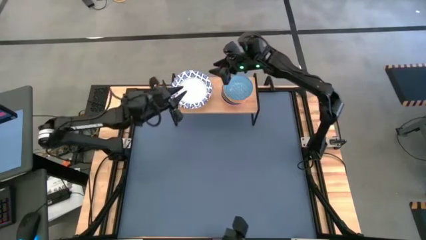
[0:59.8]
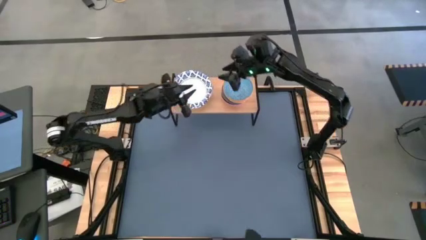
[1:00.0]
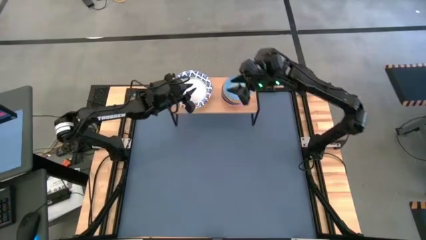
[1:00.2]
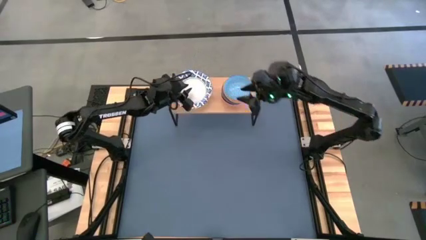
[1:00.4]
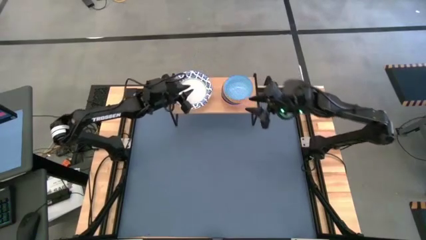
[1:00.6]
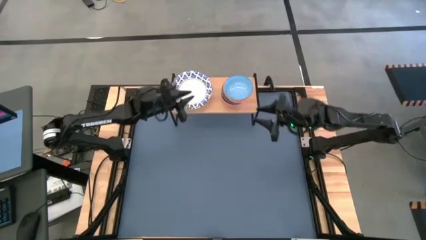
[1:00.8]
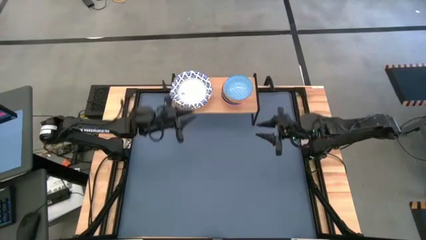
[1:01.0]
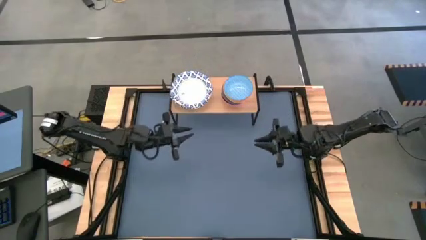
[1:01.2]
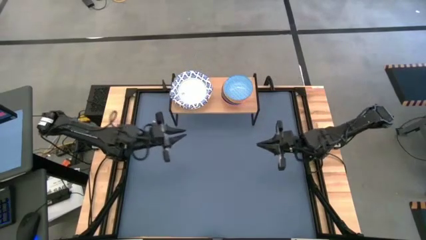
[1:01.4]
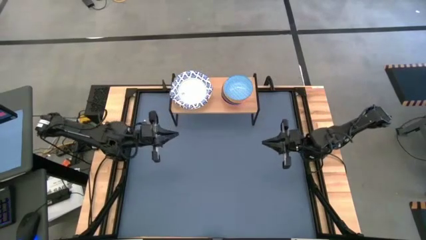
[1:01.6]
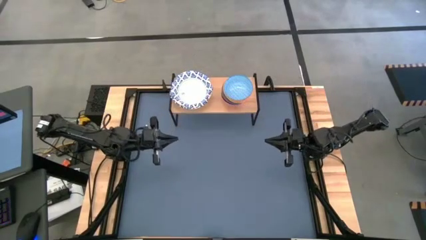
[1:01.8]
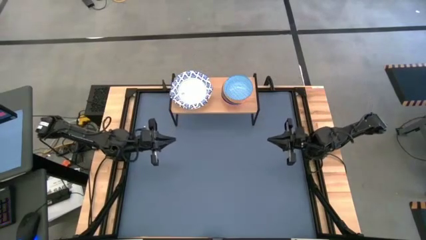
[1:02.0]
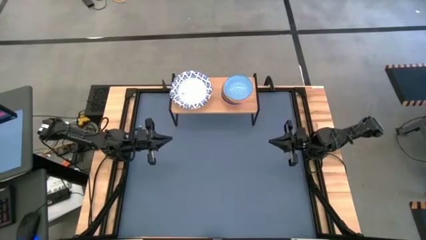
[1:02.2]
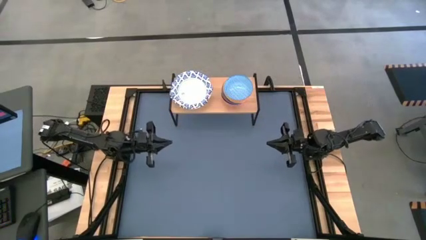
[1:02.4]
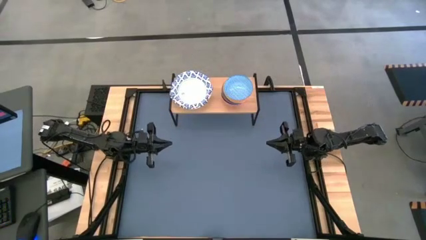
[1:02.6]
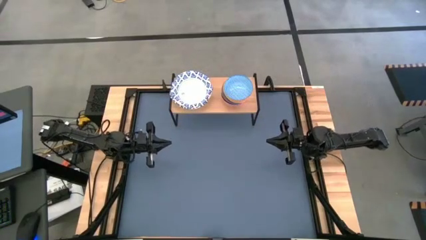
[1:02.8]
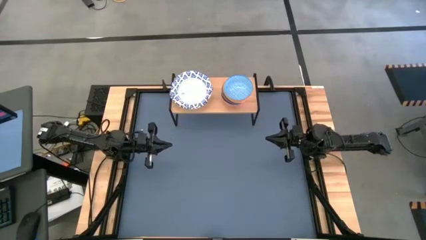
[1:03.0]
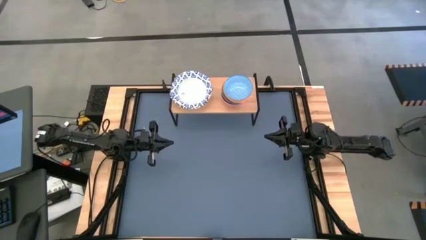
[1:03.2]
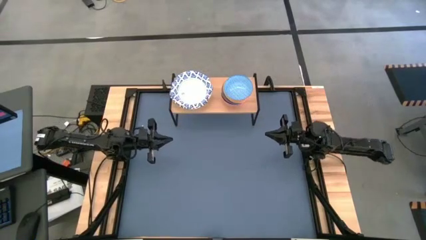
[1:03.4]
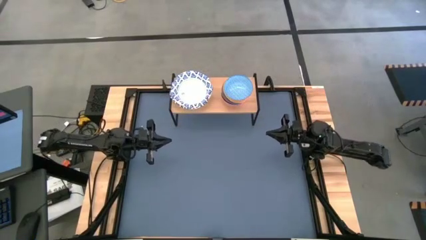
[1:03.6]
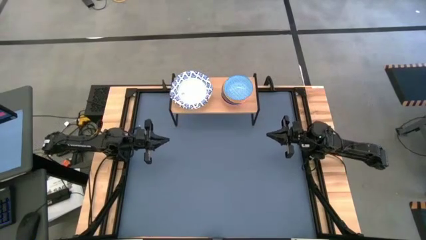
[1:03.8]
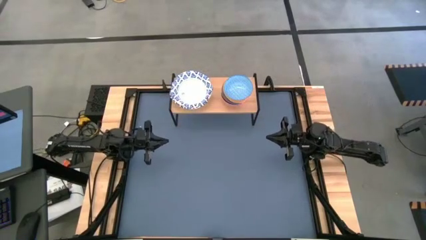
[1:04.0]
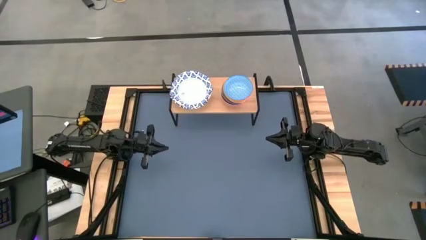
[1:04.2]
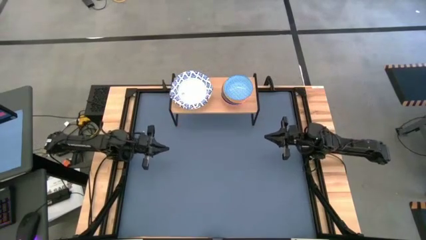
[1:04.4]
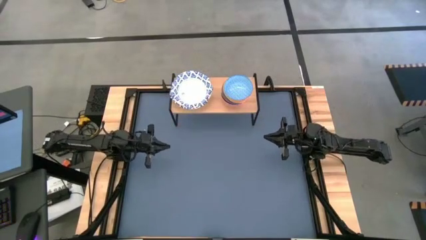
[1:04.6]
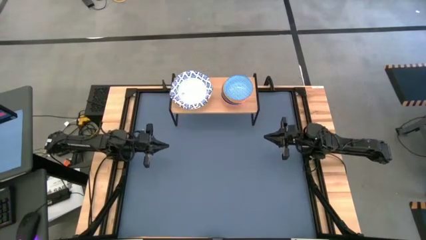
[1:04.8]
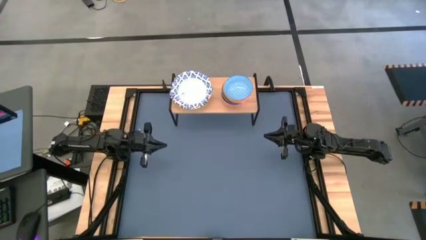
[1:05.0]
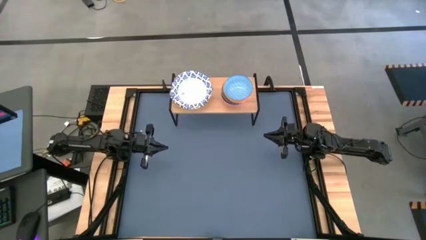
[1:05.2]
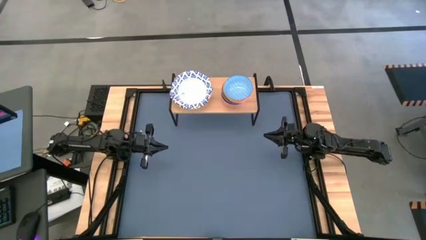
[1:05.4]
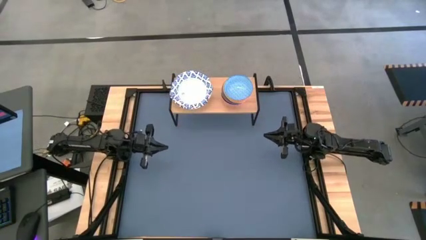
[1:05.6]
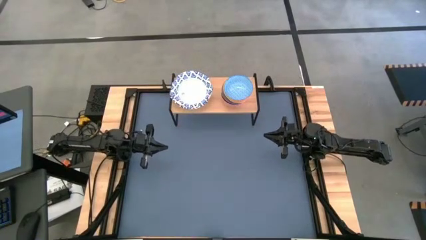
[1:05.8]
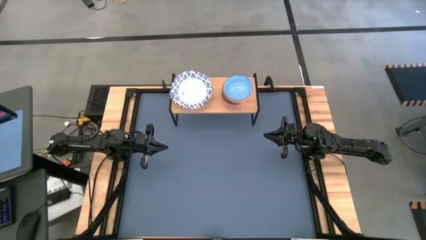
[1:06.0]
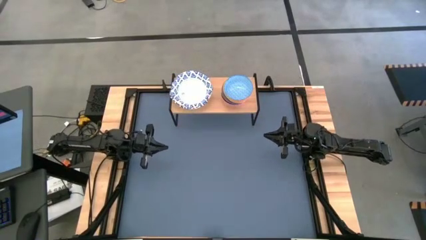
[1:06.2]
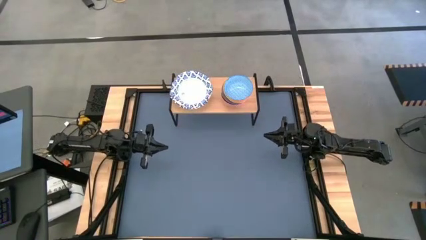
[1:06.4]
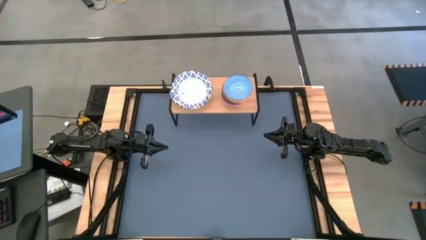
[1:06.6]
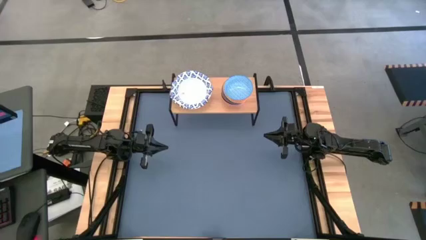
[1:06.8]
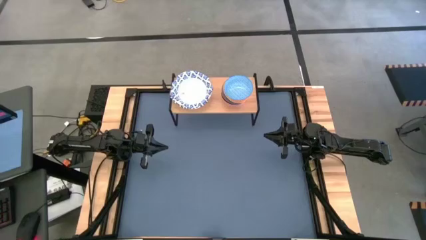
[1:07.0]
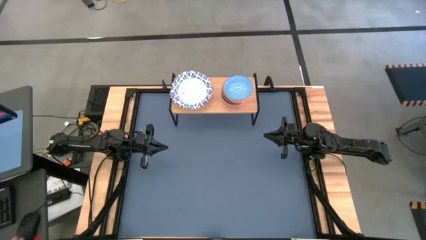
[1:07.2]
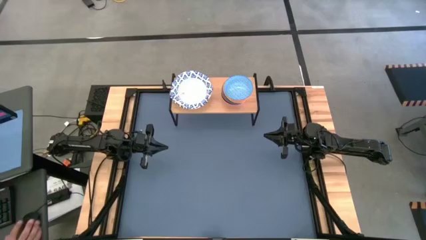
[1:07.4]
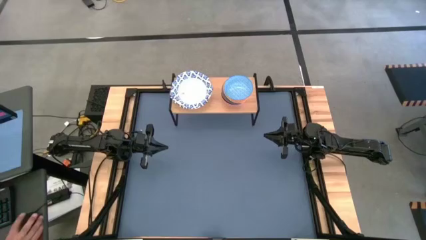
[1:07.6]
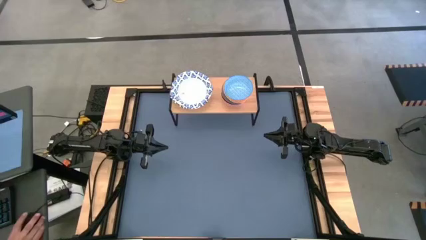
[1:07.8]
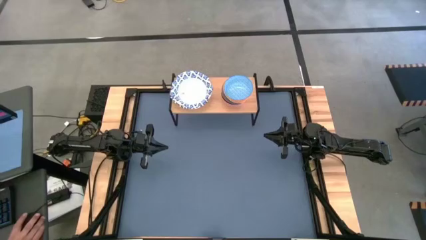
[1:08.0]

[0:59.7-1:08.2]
Task: Place and stack bowls onto a shelf
Return to Home Position

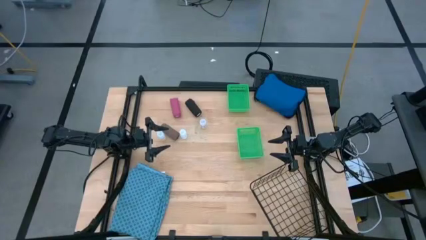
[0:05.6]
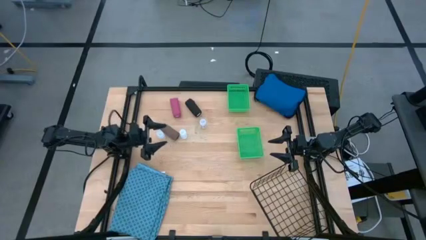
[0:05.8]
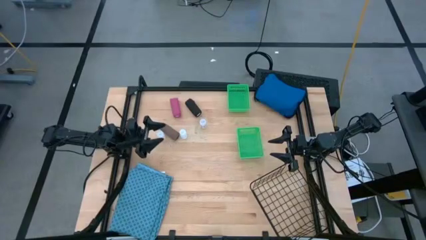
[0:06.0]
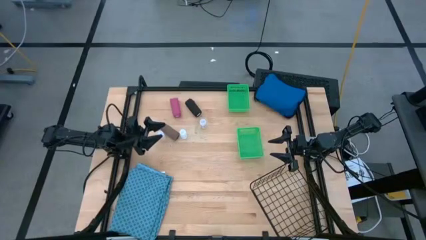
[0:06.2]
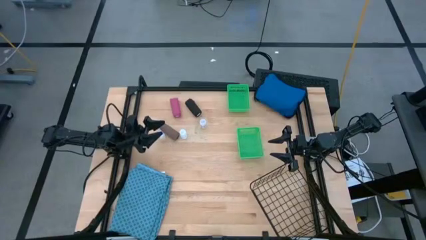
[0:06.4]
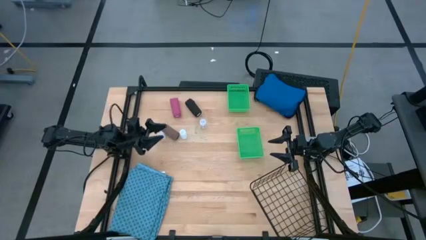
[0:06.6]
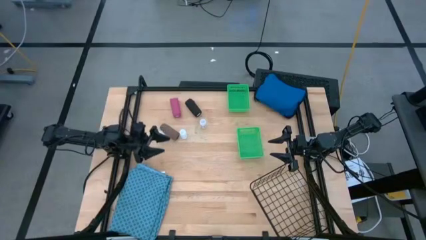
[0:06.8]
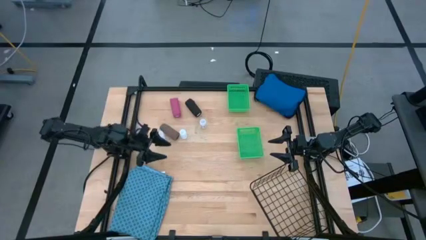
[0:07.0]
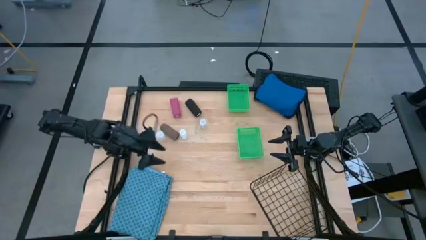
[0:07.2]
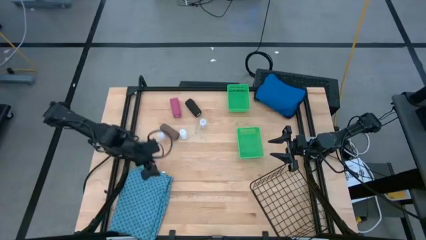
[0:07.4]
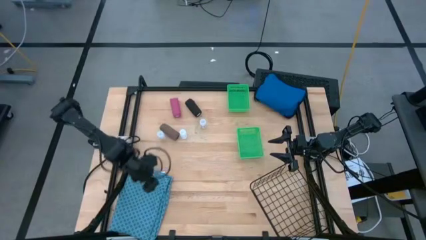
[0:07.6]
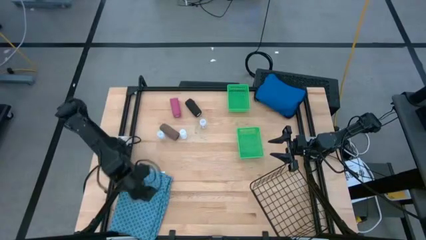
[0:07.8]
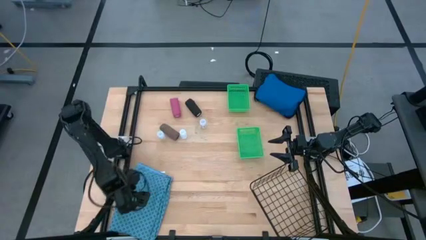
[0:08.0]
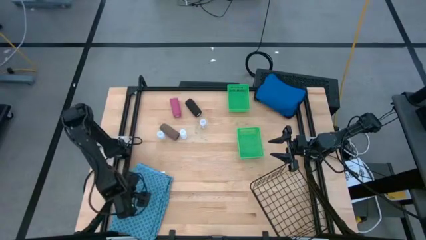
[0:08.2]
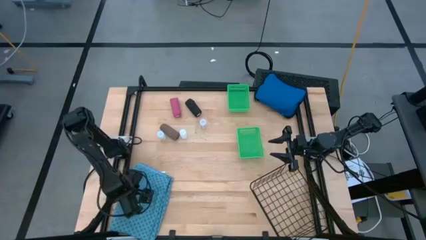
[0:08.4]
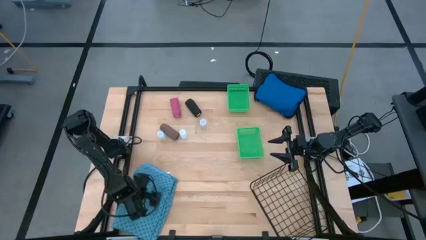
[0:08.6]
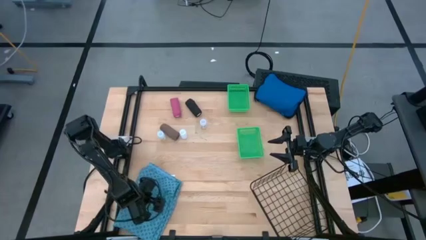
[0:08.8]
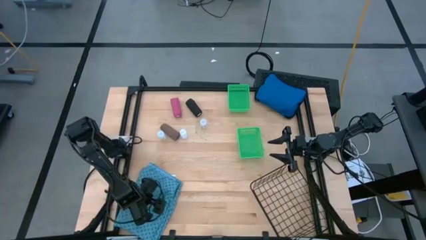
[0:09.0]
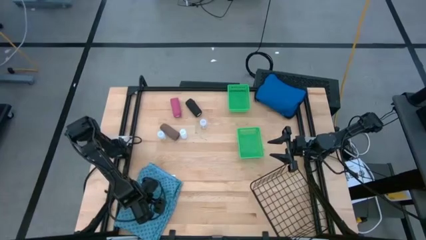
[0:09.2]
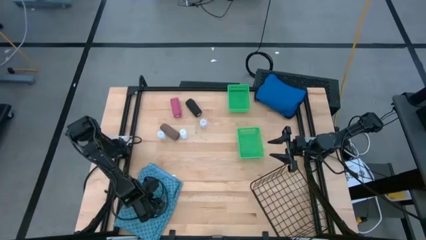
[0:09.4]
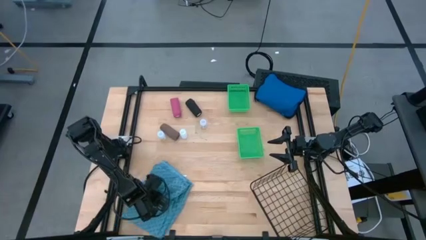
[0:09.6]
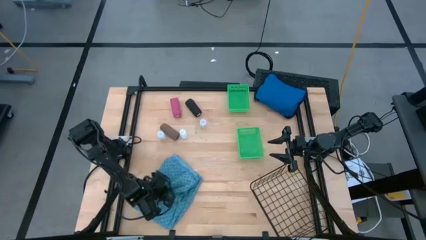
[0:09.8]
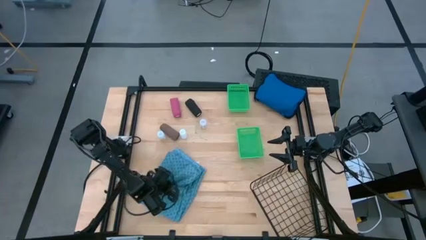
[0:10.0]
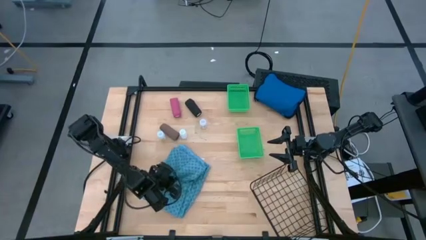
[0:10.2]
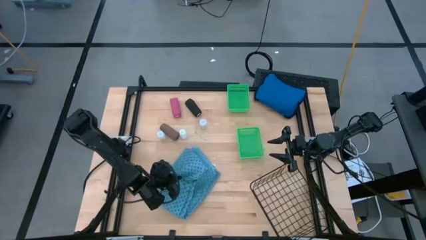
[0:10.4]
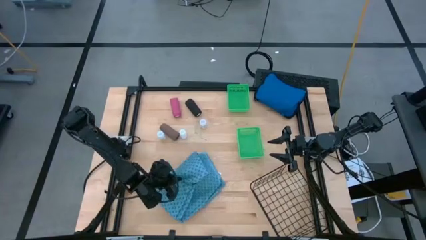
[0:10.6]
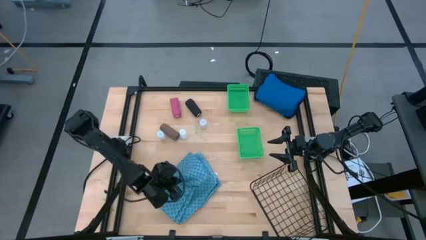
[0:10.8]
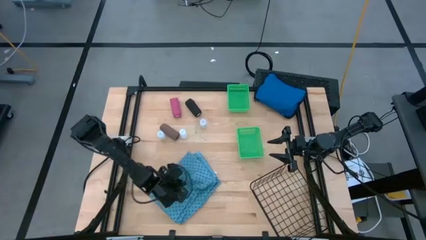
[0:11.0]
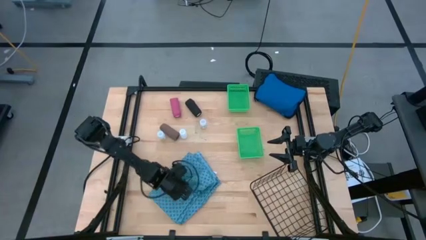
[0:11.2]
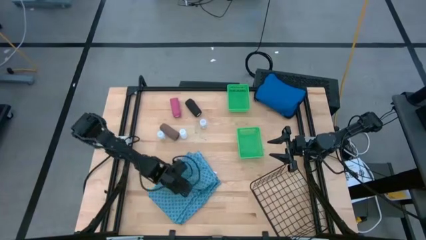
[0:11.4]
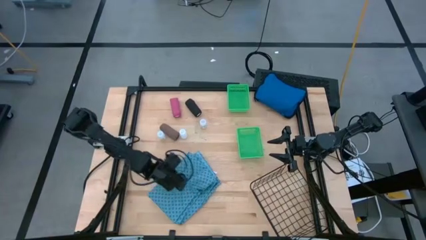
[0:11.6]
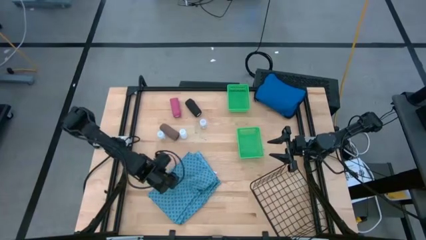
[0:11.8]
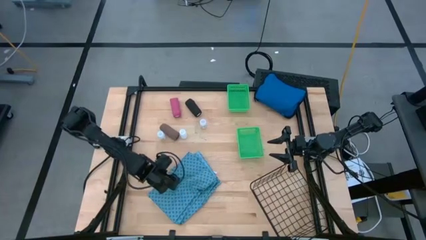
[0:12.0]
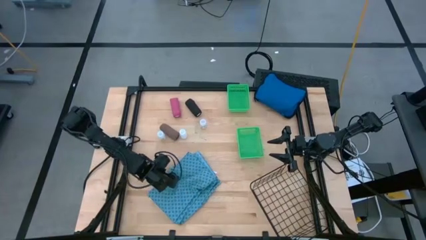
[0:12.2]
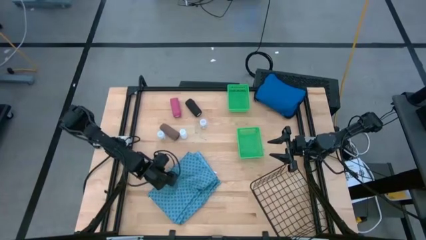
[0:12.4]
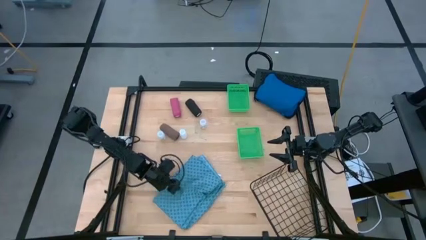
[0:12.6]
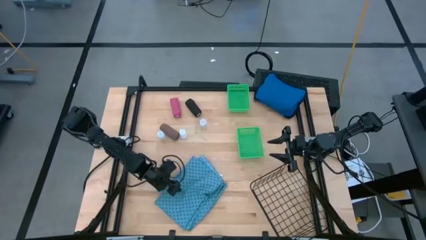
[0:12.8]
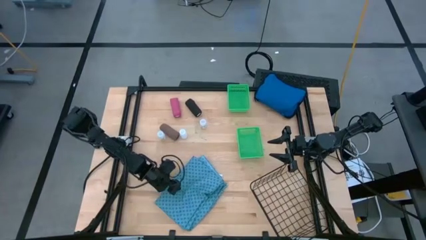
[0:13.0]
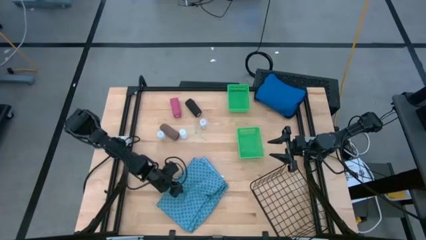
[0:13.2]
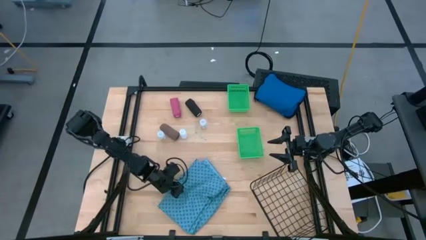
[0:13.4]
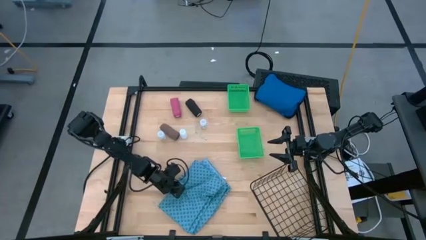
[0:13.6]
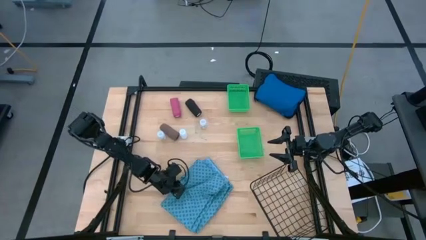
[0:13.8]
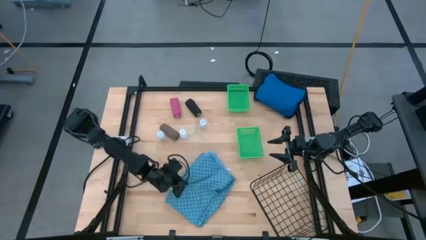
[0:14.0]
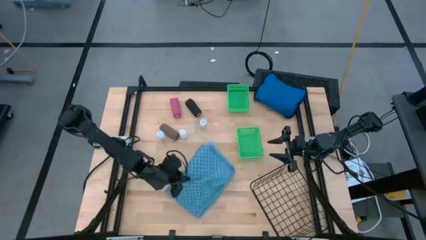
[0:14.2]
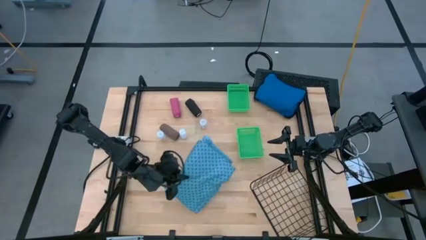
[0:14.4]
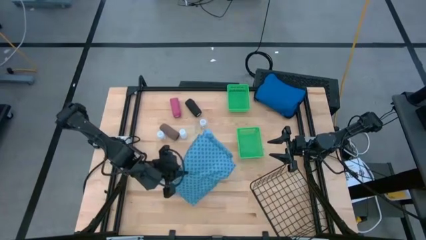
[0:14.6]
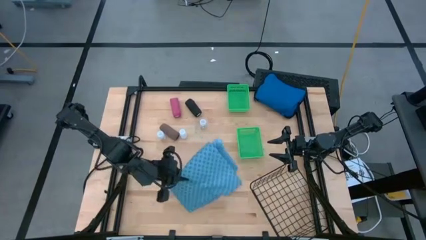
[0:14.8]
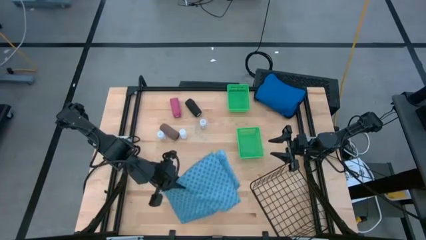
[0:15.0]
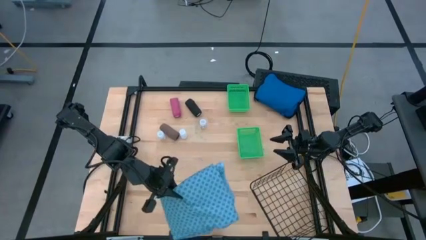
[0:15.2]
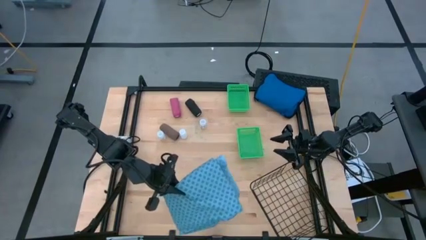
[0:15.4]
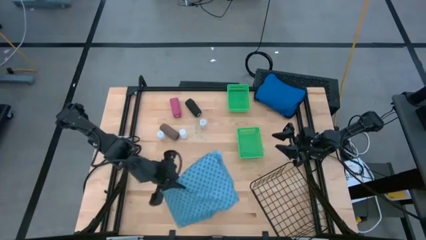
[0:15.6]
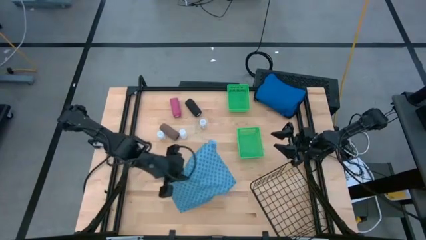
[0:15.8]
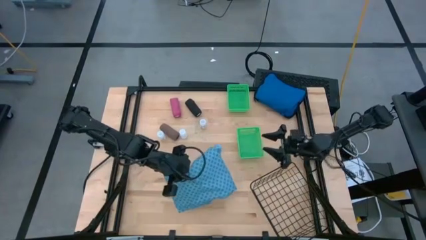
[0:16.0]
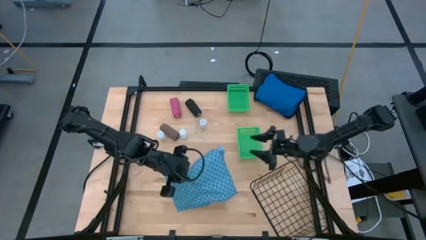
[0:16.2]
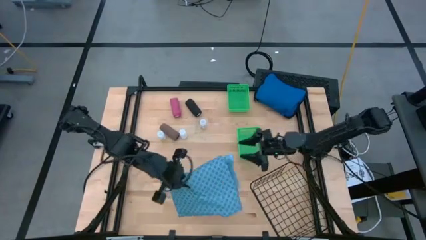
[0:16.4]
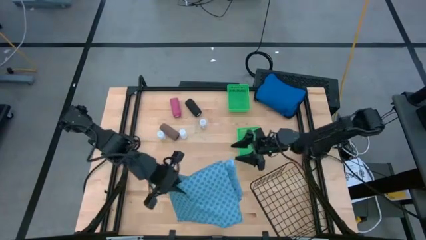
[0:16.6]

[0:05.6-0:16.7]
Task: Pick & Place Medicine items
Put the blue gown into the wire basket
